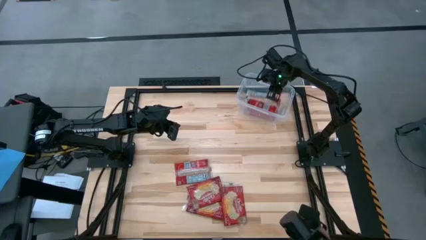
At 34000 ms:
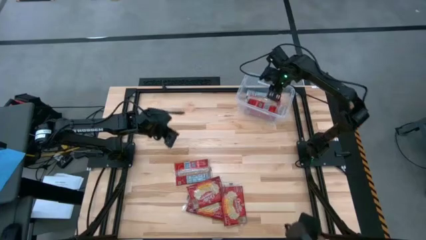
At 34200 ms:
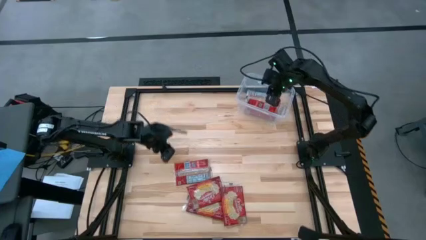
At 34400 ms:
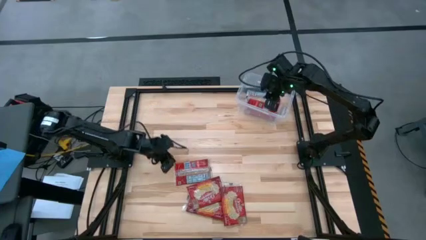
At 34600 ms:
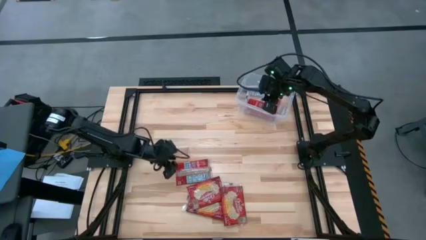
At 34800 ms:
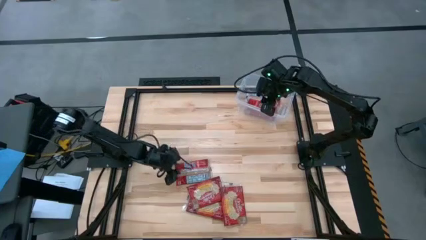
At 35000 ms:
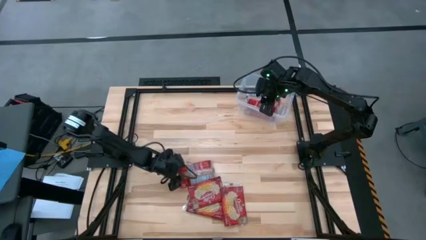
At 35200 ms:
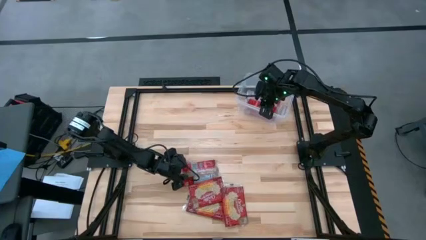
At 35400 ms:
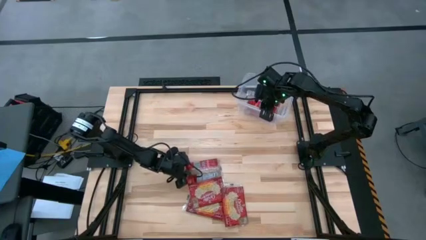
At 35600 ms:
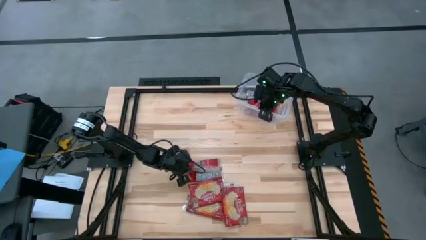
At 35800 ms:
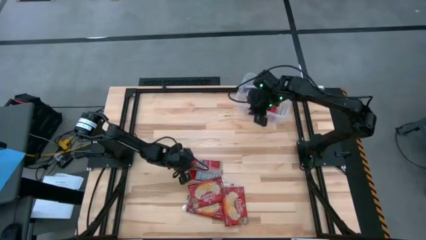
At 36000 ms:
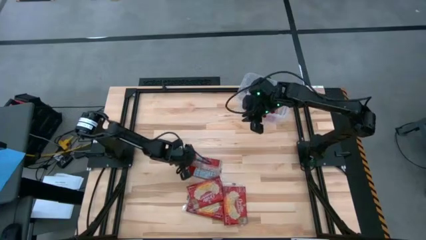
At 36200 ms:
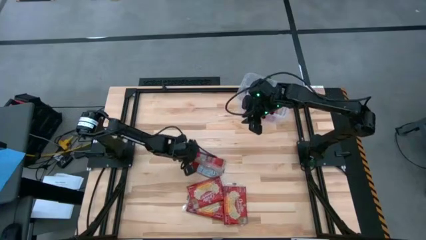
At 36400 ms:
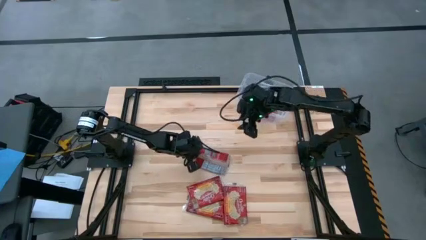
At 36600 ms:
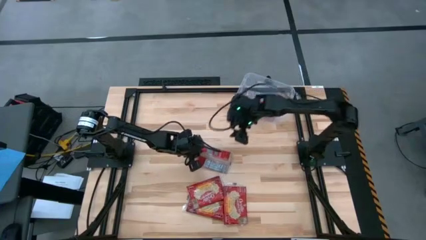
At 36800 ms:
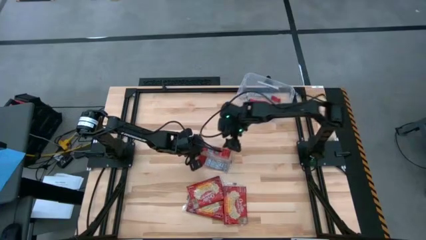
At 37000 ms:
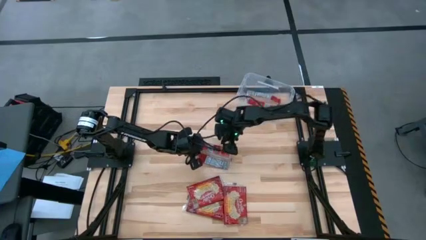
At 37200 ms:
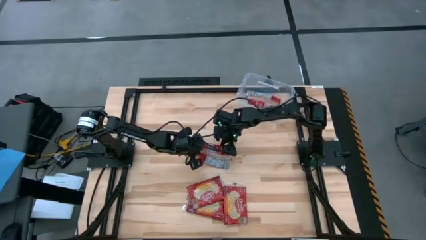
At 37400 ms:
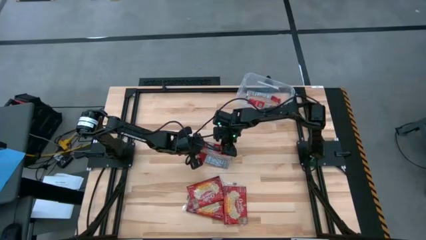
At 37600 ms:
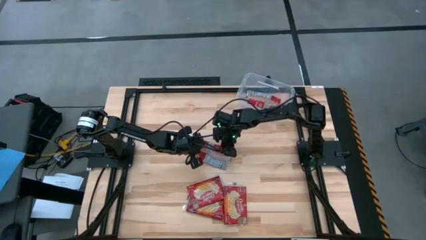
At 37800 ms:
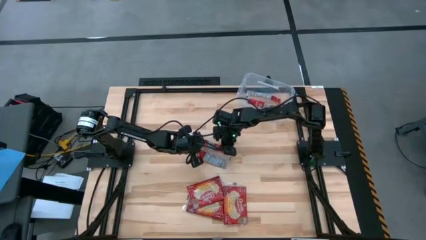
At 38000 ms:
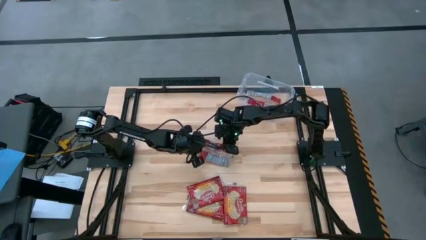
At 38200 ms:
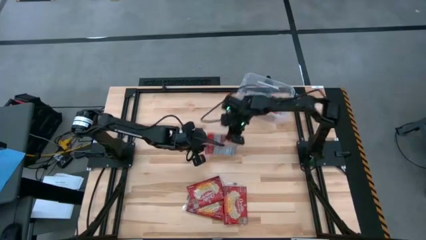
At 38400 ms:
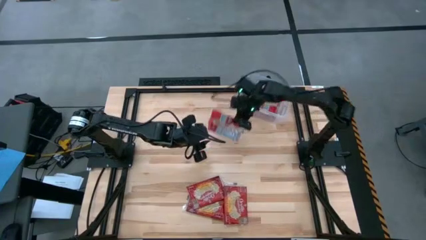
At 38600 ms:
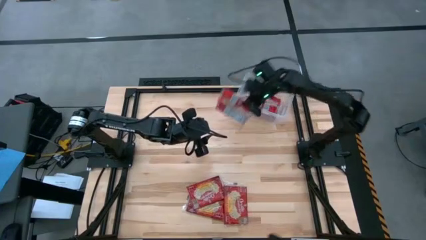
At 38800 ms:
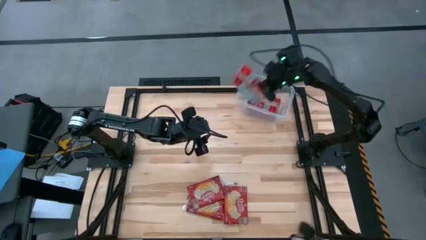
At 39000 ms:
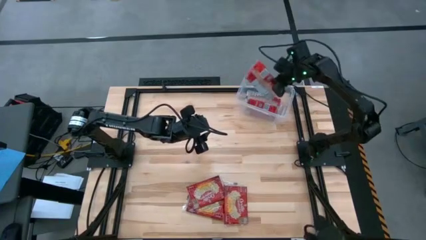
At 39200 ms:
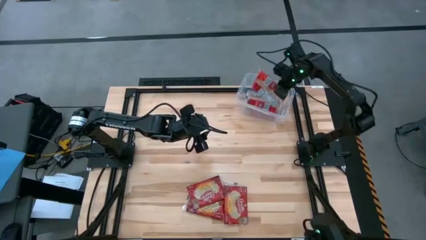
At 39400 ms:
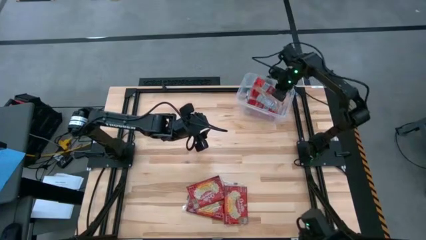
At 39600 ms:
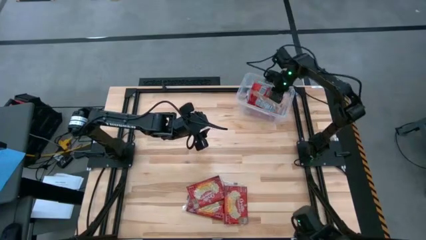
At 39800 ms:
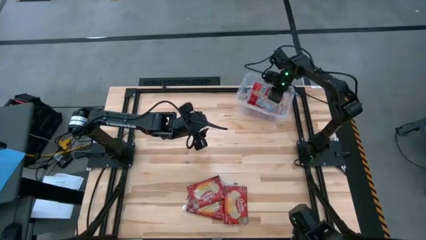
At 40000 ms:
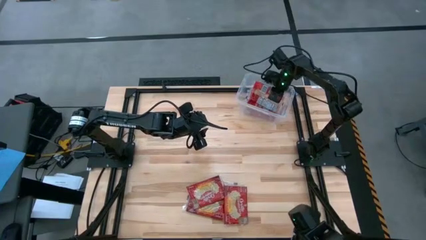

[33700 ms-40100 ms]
Task: Sort popcorn bags into baskets
Put the red popcorn bag into the transparent bin

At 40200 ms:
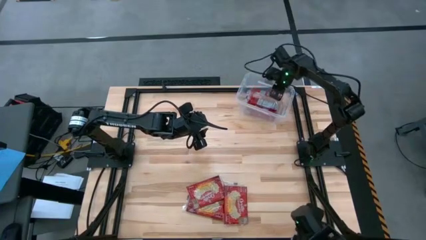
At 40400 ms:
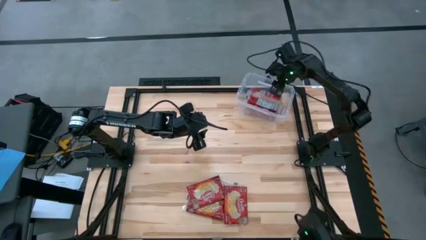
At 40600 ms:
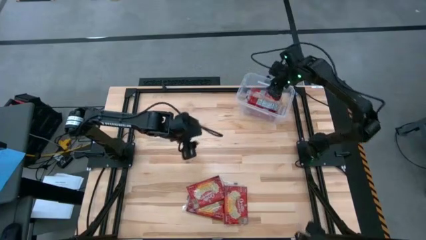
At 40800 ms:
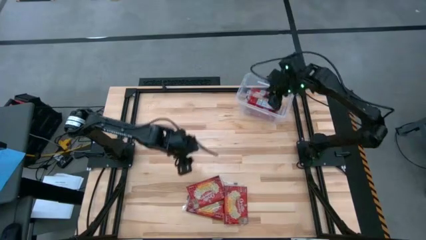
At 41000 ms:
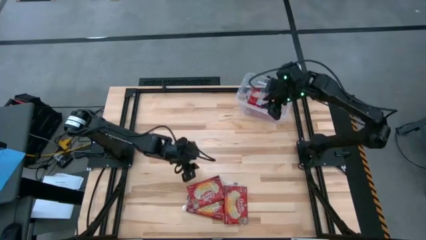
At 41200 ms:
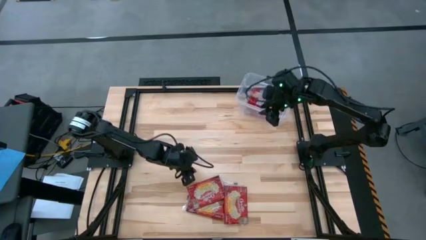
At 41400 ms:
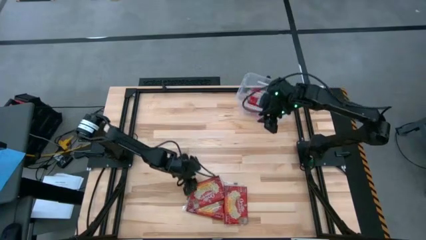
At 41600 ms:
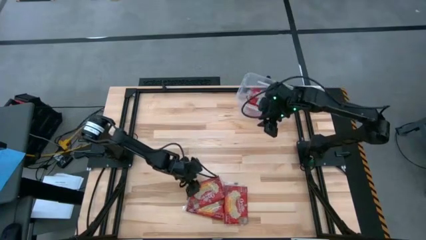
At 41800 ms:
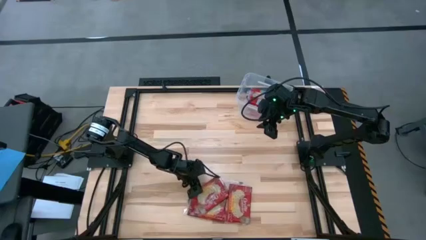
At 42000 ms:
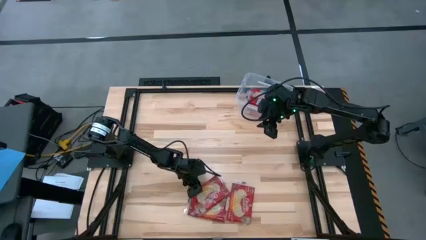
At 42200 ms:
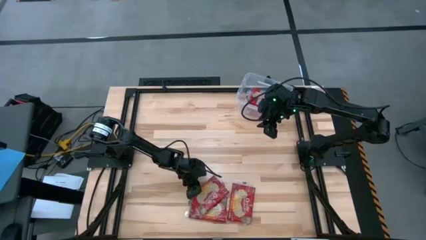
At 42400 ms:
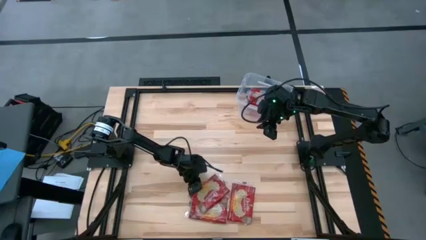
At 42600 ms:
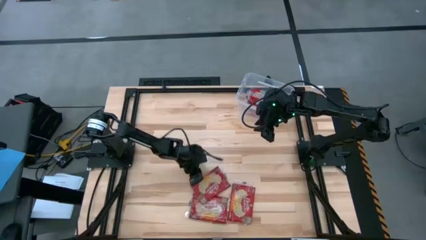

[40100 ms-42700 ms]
Put the red popcorn bag into the transparent bin

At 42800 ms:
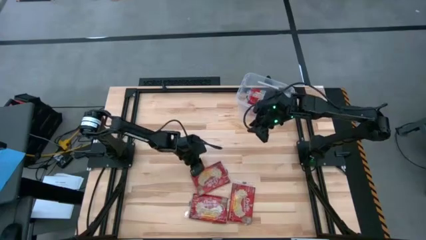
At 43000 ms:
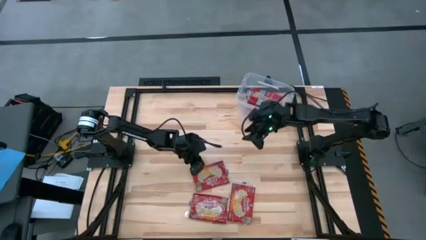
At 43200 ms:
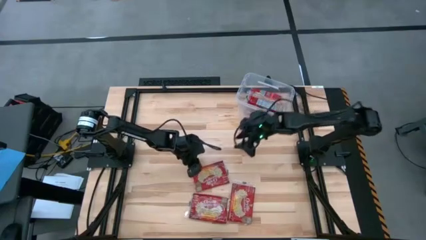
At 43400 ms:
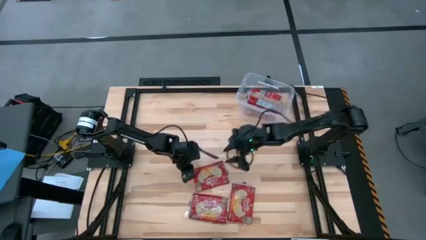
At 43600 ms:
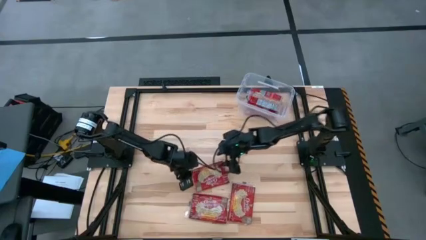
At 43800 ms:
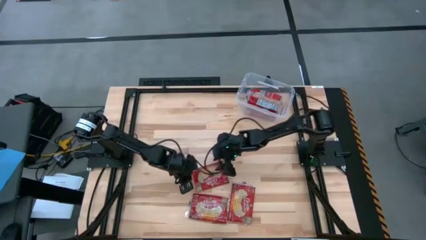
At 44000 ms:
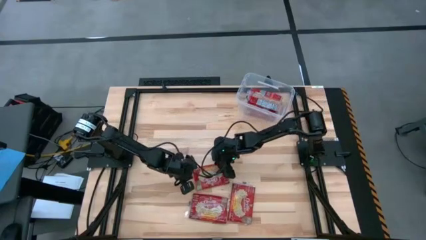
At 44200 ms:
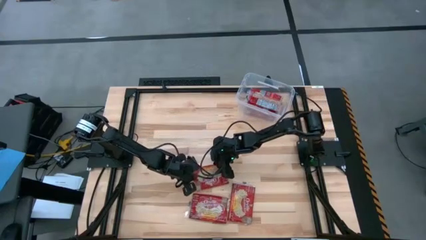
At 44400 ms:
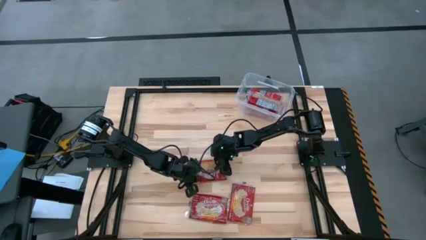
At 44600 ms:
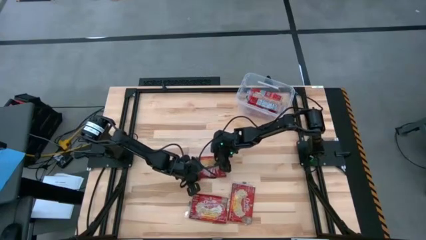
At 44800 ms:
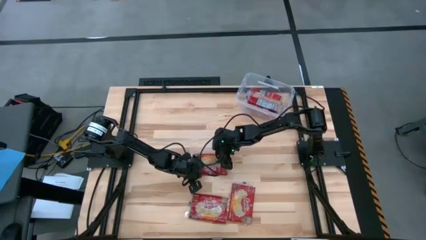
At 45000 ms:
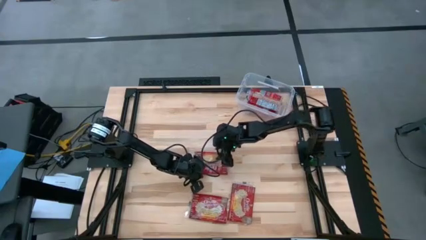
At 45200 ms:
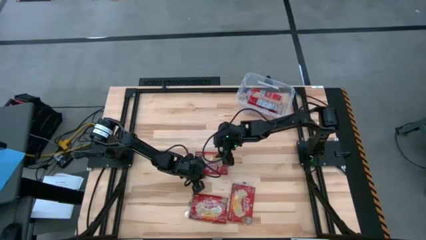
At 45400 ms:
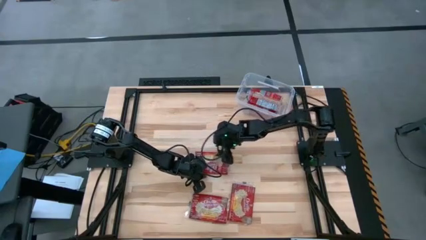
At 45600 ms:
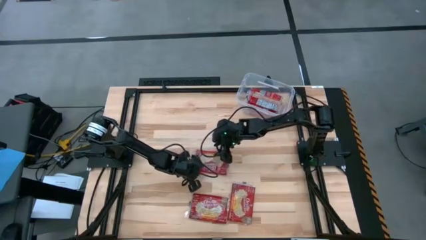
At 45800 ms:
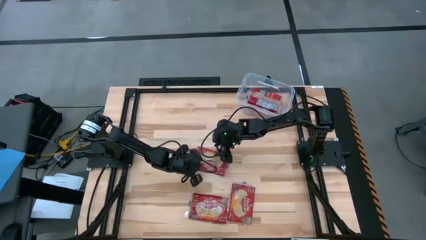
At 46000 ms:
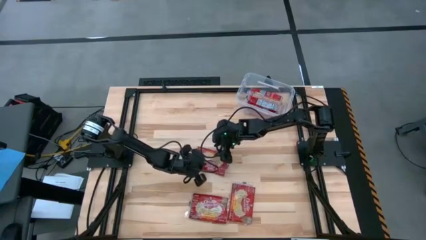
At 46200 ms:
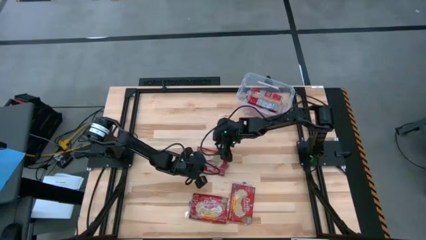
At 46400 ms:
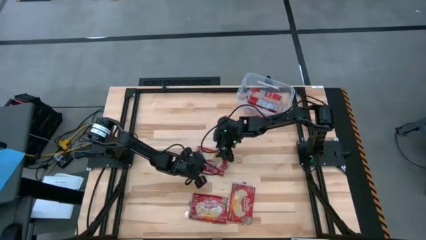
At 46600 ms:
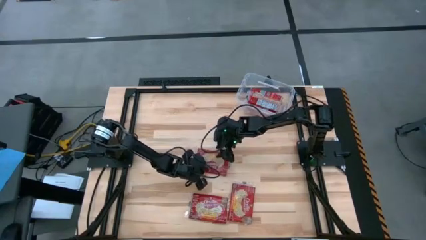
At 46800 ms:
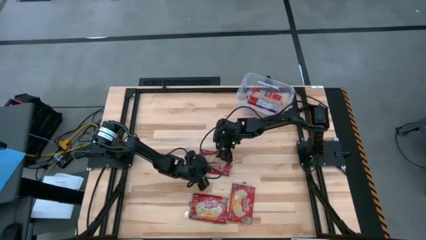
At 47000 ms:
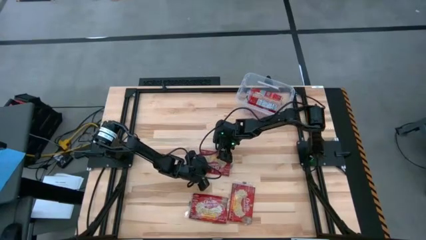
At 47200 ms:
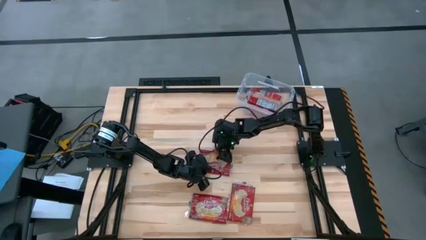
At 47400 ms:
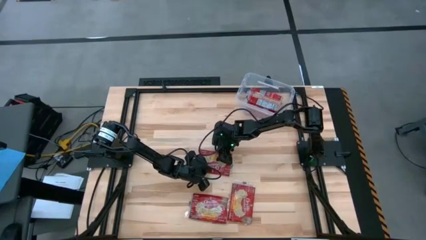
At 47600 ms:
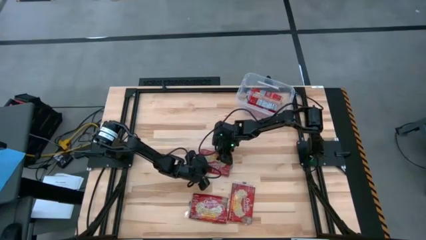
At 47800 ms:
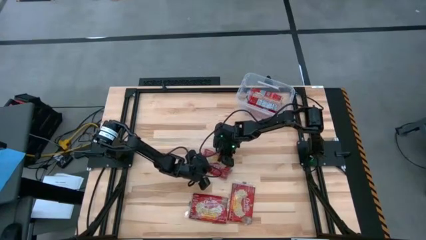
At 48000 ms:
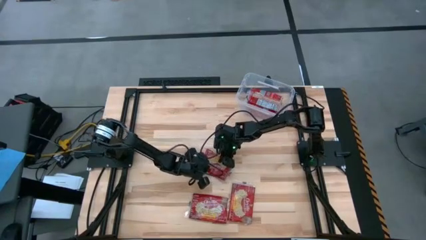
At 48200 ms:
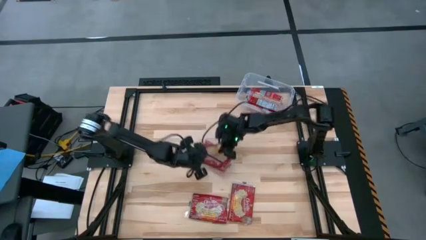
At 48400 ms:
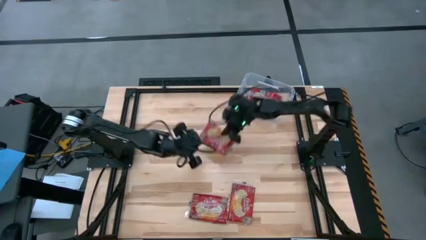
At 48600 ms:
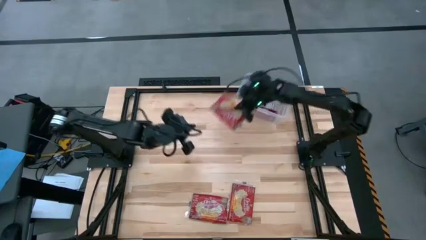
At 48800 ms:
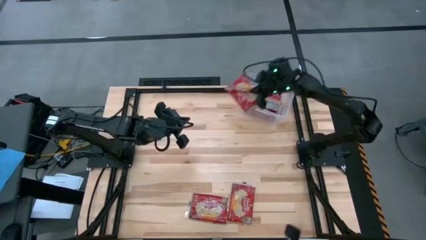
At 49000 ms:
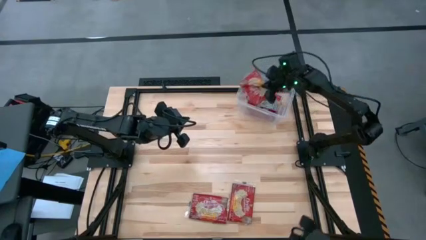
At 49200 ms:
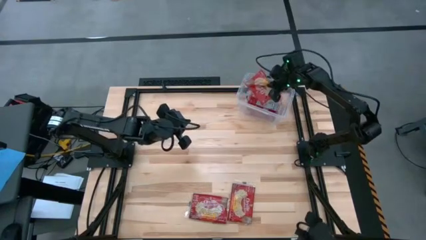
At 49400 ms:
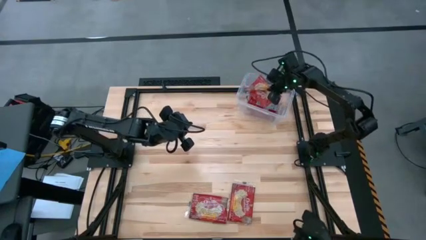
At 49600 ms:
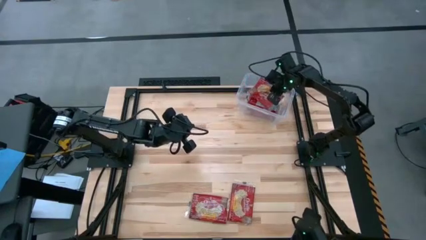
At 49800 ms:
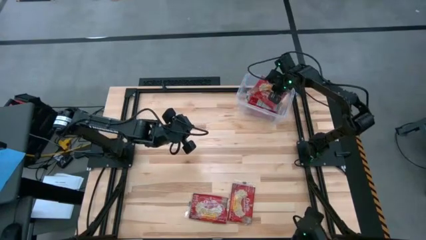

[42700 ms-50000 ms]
Put the red popcorn bag into the transparent bin

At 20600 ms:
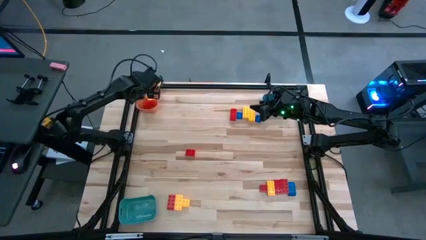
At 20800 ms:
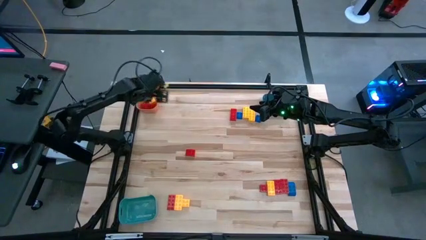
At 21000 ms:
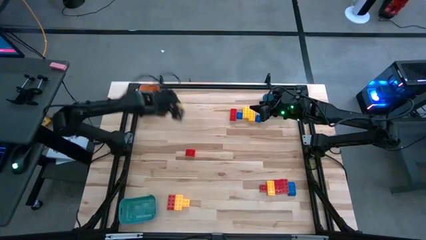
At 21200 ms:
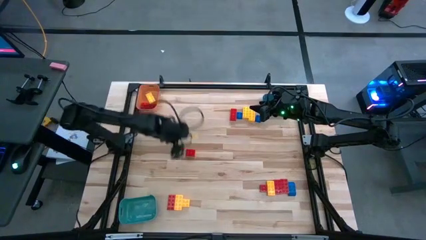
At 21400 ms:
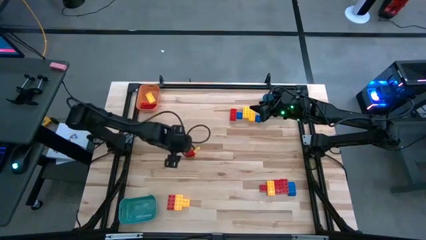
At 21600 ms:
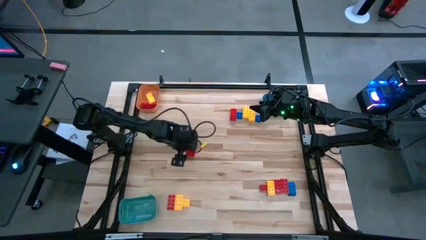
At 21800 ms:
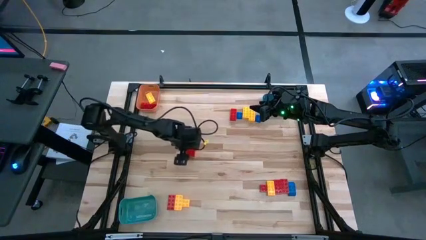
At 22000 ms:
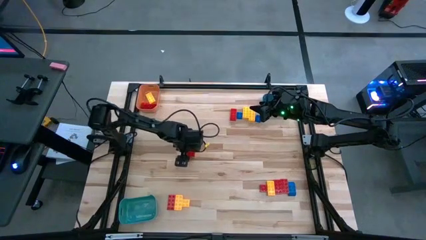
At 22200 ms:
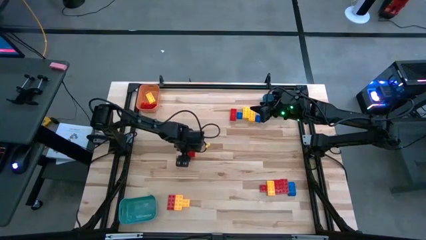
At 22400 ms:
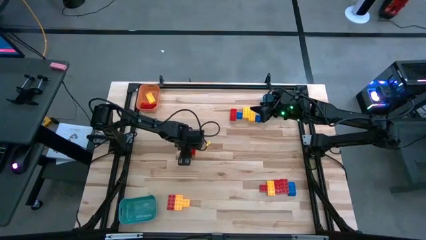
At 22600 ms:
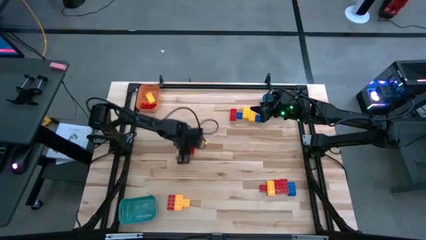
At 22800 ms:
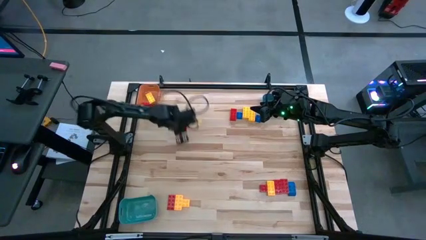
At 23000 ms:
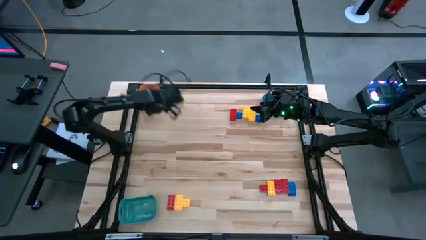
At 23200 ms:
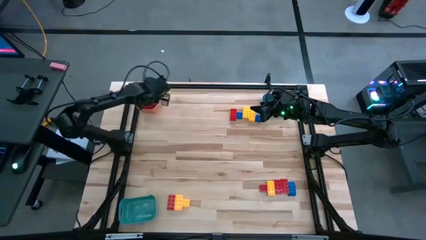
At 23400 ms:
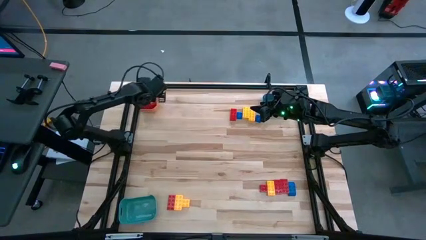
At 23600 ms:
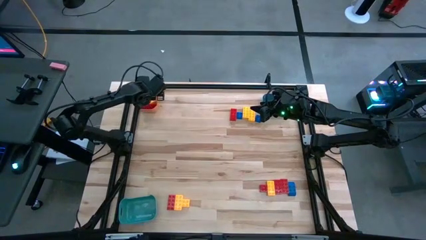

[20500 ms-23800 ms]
Task: Sort blocks
Put the red game piece into the orange bin
